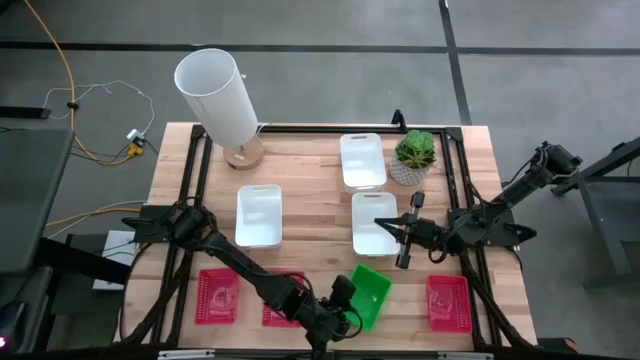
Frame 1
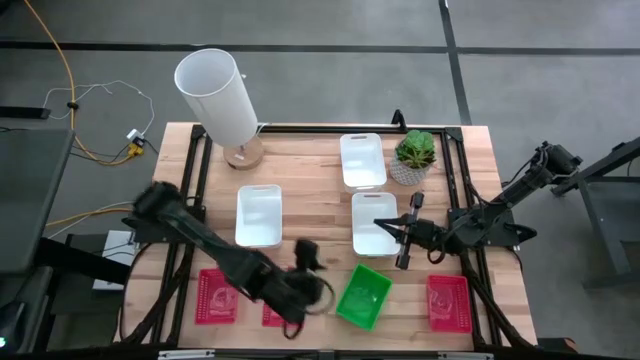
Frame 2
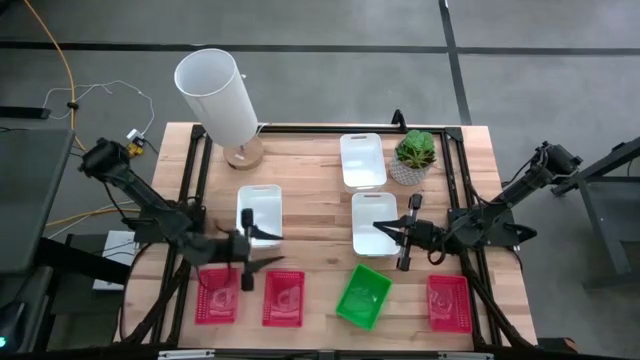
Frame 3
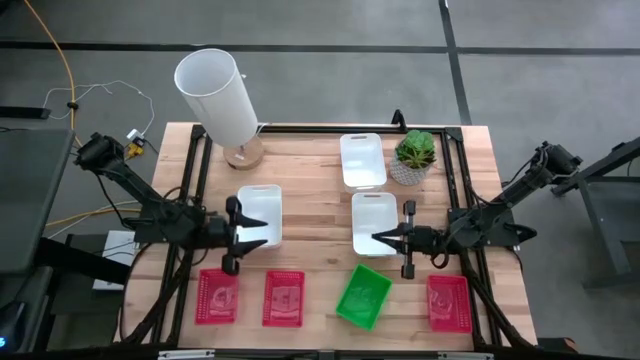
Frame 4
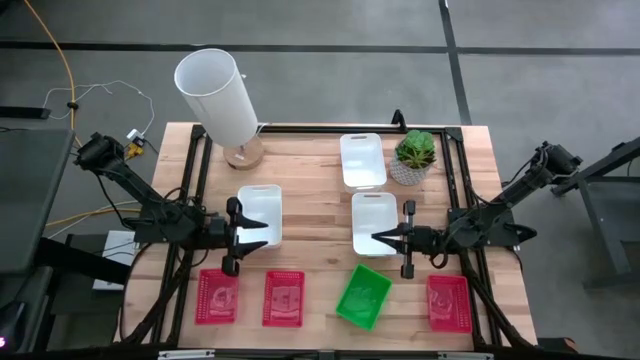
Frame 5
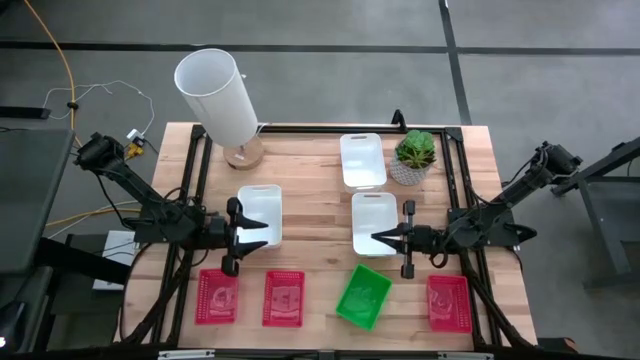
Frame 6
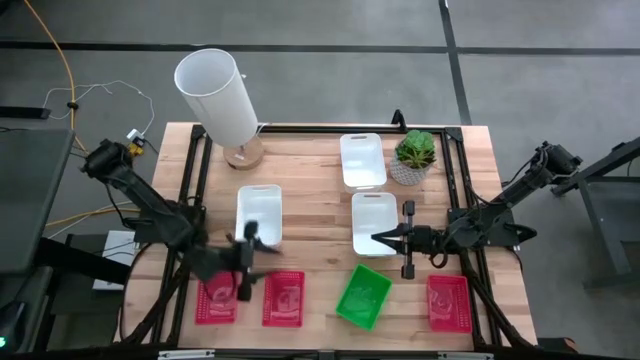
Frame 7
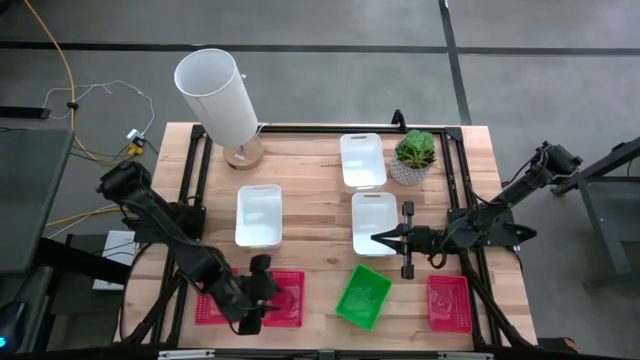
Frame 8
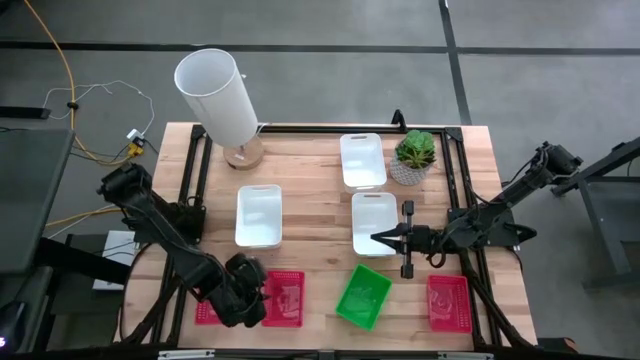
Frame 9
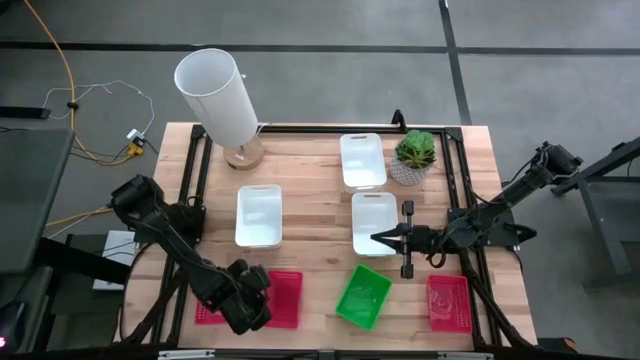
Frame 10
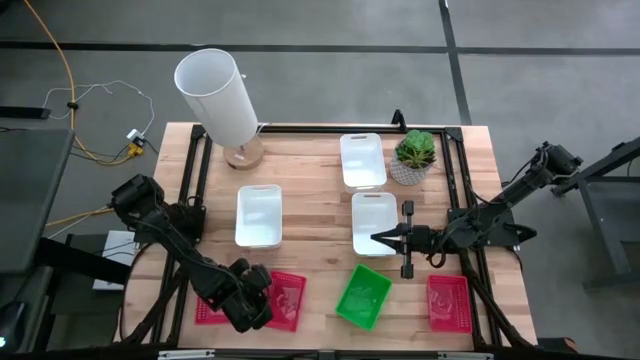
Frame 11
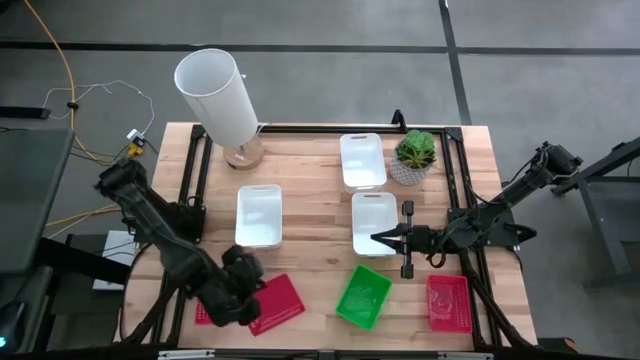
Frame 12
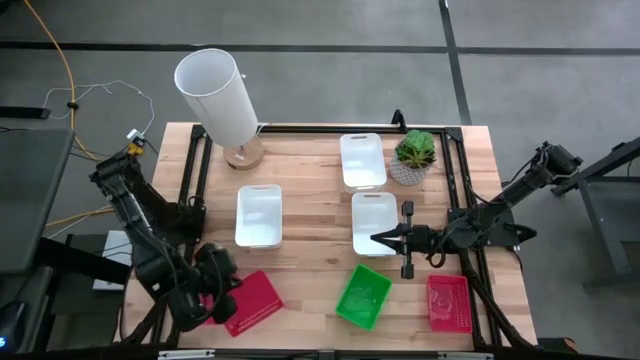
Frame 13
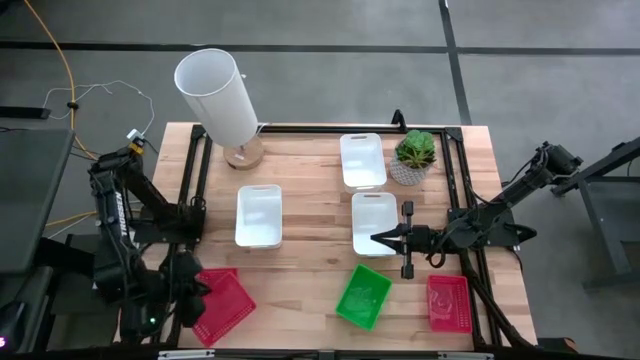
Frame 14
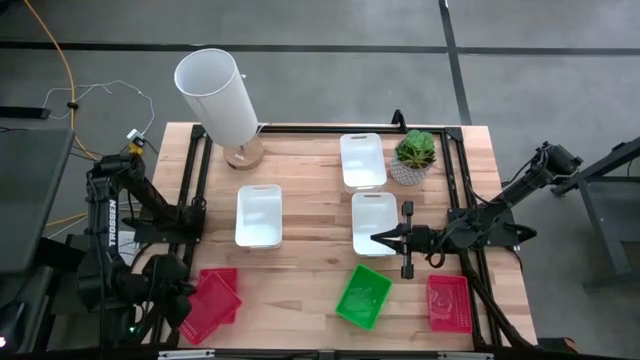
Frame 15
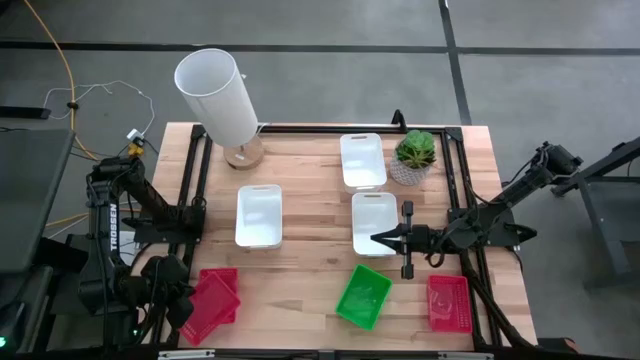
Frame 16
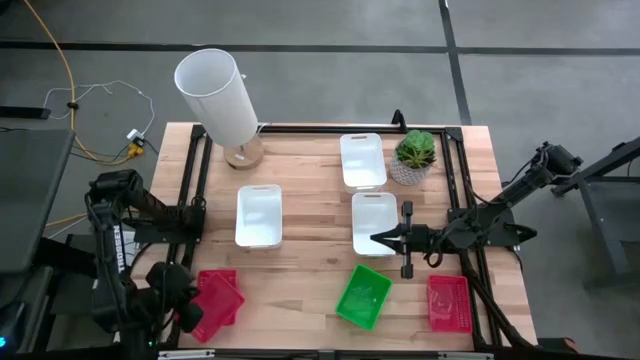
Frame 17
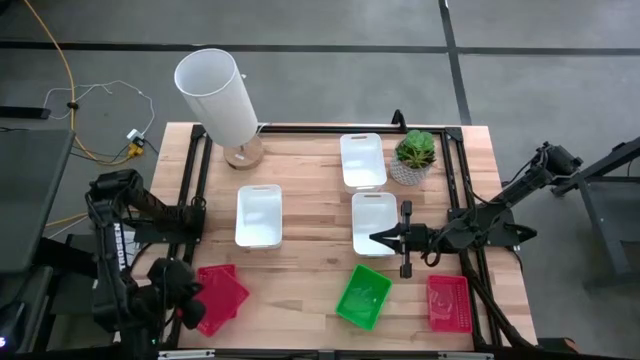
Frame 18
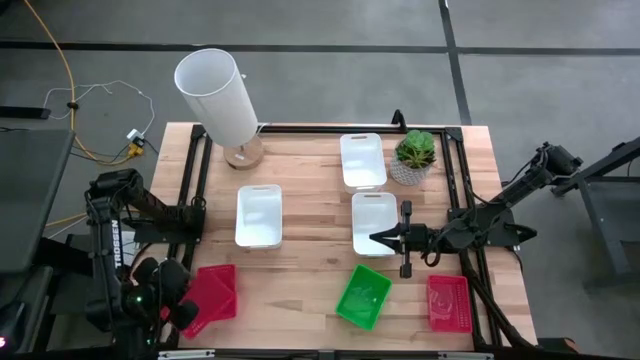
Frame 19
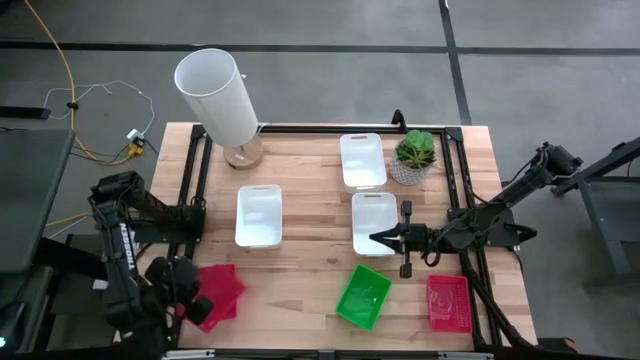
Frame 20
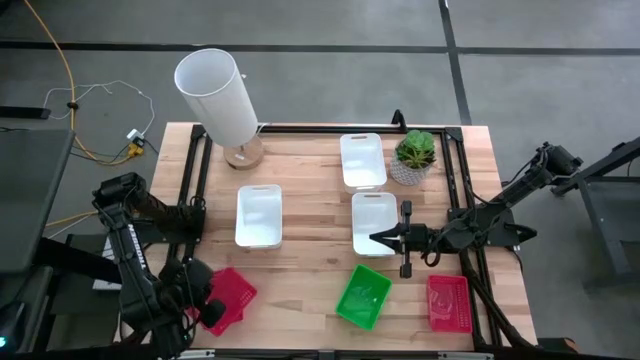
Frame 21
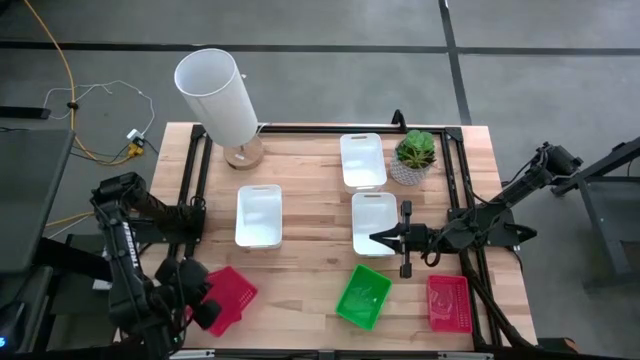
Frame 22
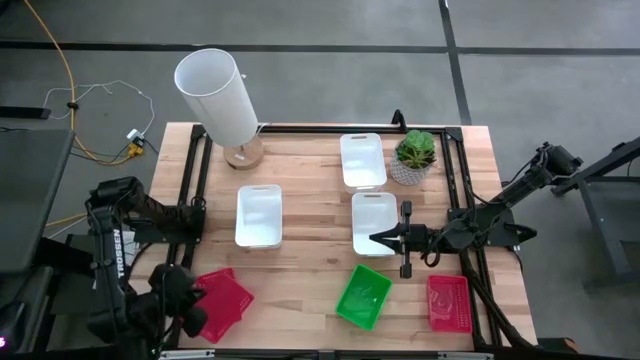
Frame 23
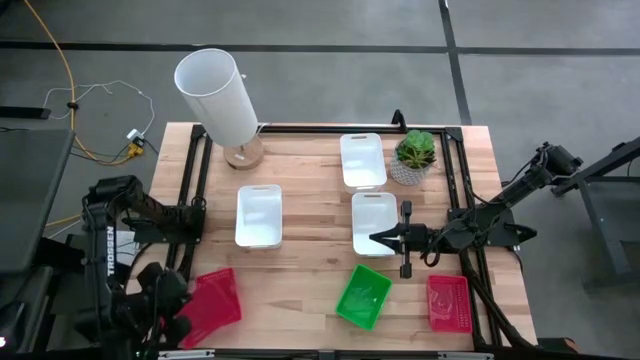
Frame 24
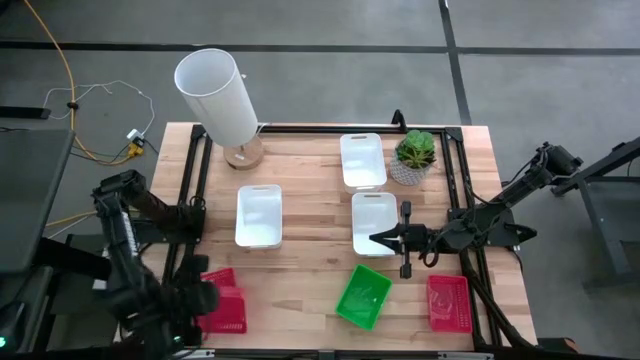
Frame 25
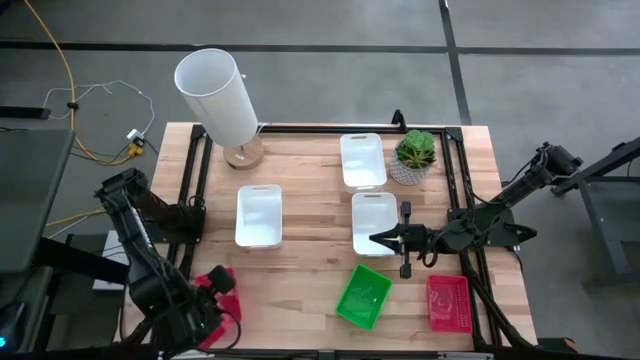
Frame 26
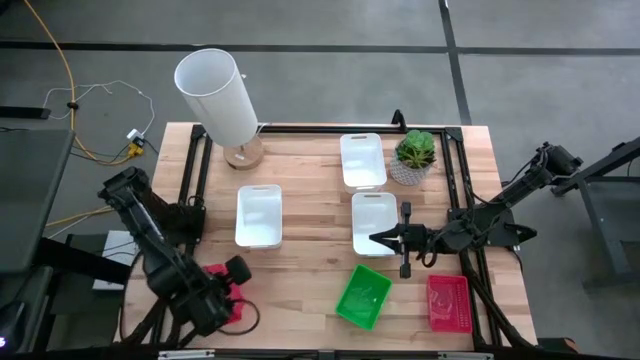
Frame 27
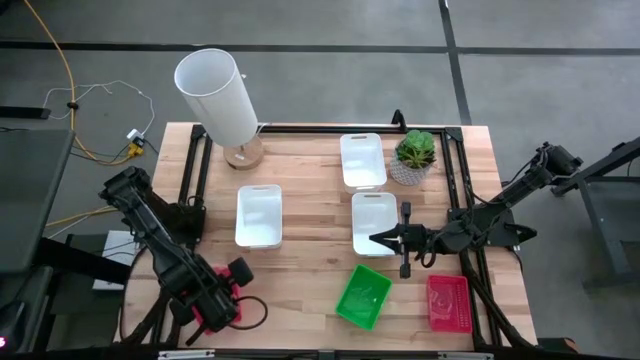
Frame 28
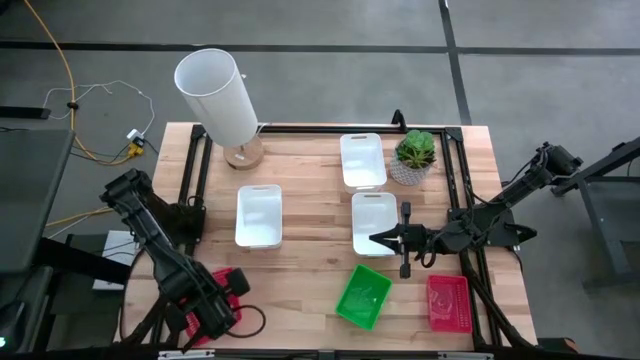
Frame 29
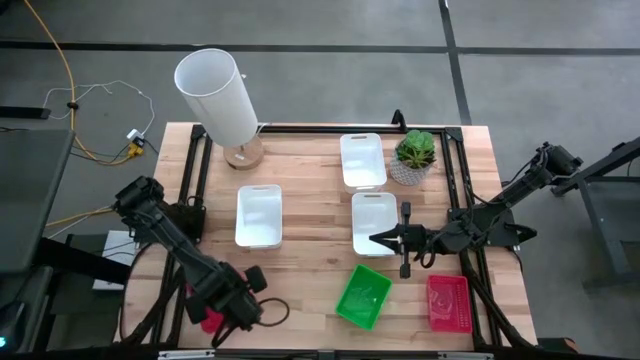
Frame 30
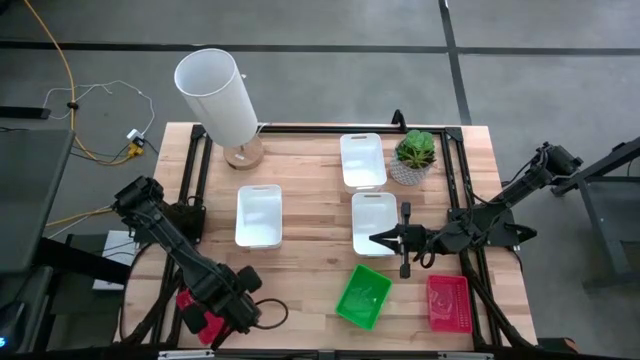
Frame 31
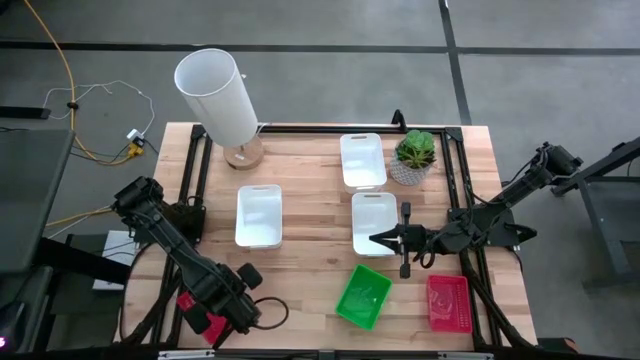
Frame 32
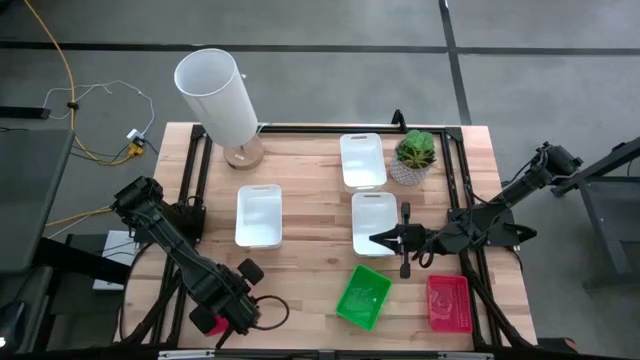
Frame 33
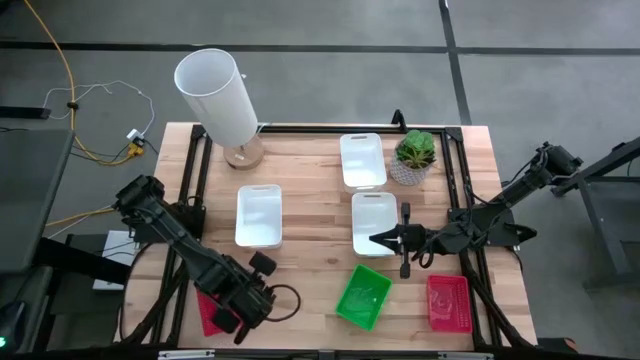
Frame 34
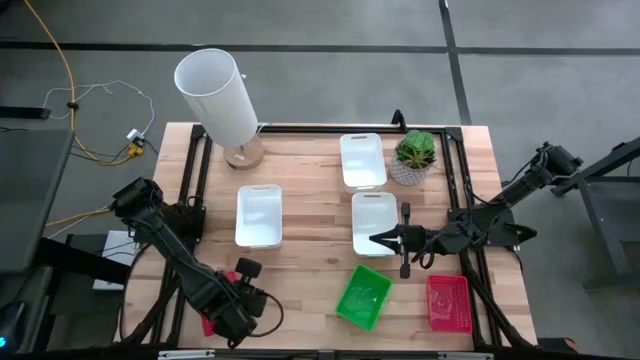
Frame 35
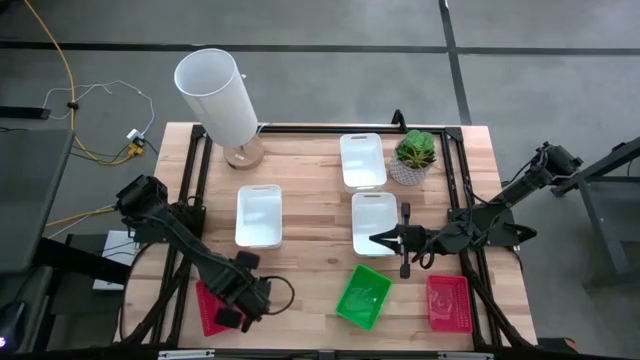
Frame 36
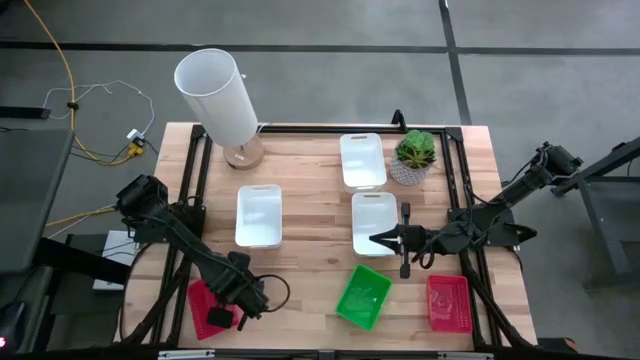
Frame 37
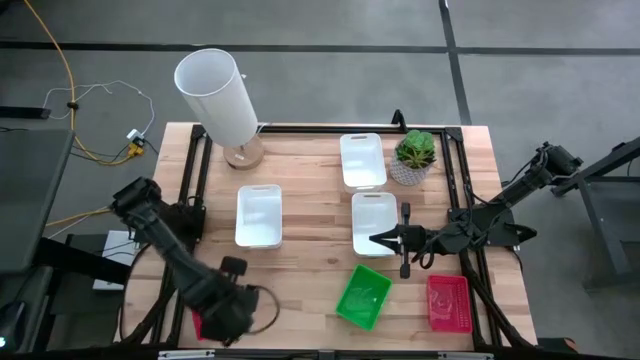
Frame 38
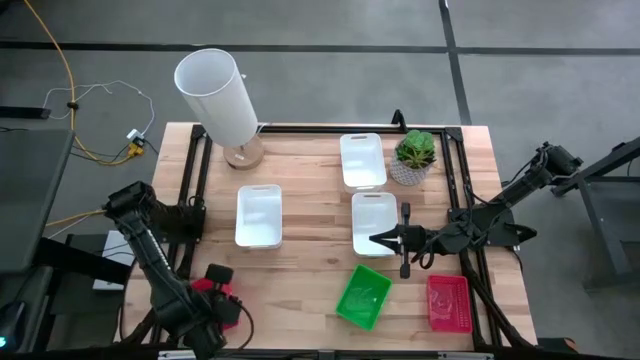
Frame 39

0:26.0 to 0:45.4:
Stack the middle red bin on the left red bin
